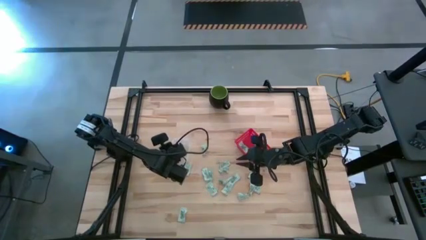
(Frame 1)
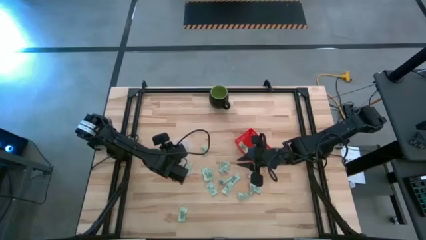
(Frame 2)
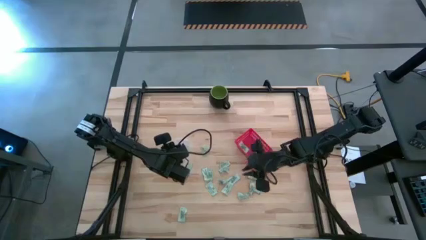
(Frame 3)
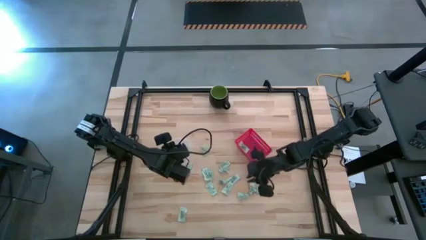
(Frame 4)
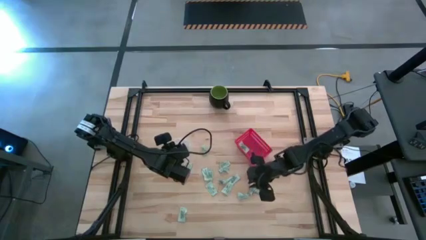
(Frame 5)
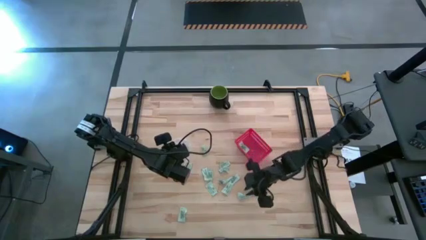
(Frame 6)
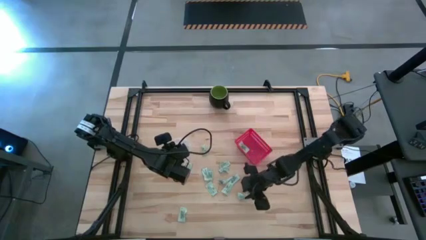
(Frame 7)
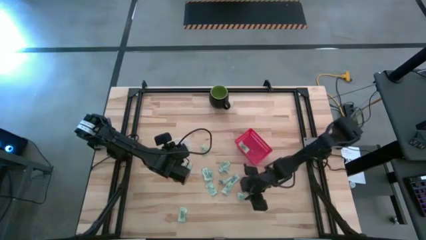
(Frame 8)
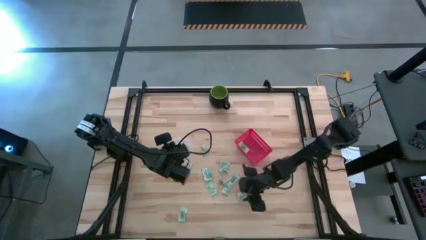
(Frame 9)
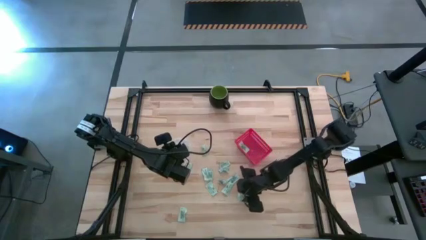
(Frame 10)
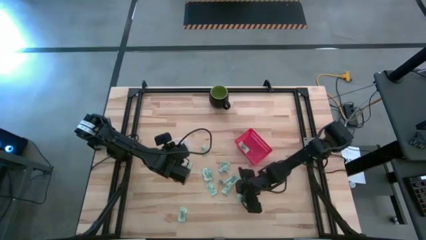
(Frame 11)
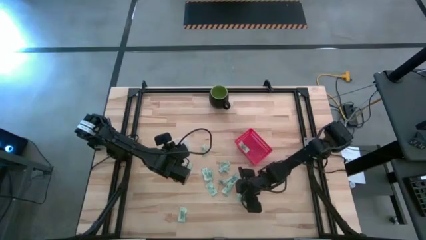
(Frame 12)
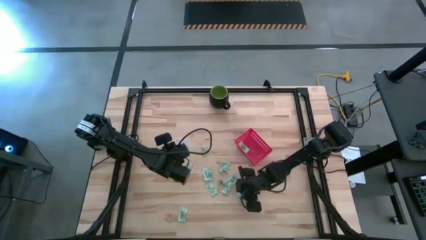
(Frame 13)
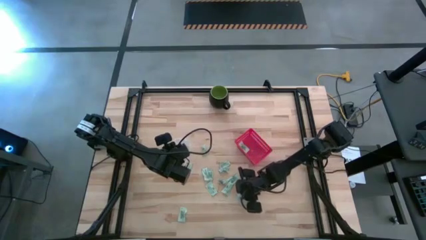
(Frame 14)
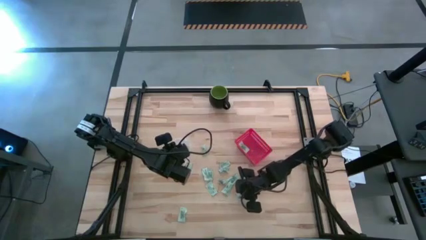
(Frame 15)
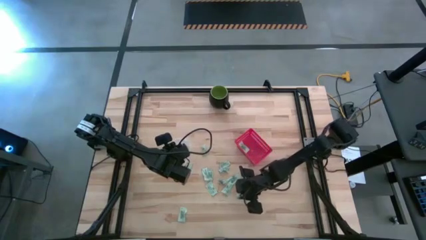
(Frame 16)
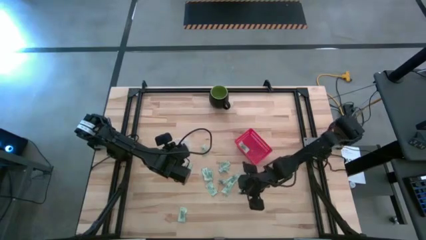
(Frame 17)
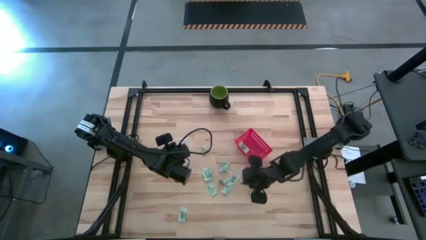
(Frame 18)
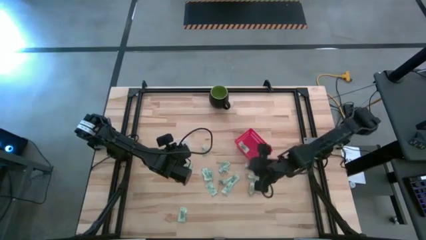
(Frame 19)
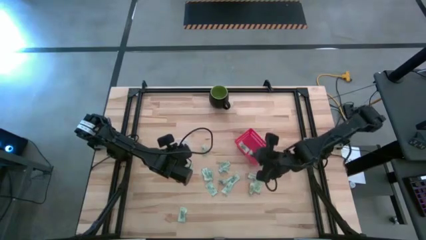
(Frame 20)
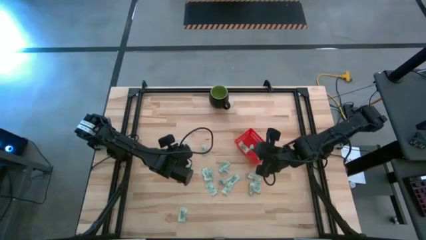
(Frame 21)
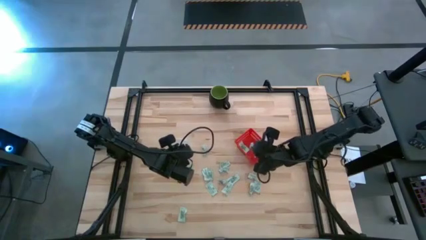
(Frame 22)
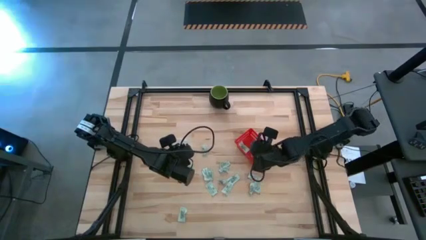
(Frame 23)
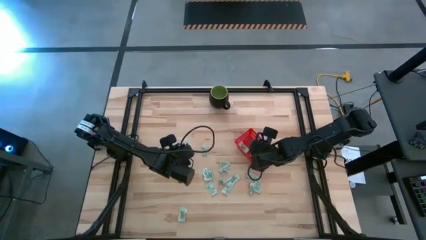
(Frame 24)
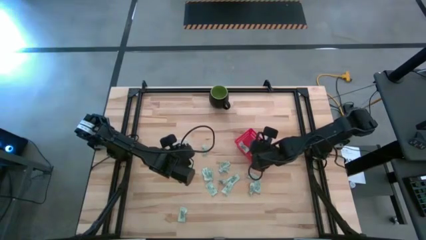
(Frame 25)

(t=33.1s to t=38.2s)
Task: Pick and place items into bin
Put the stevia packet into the red basket

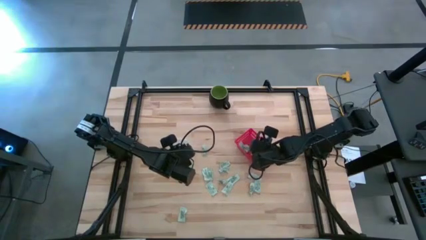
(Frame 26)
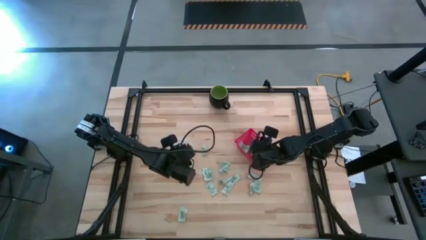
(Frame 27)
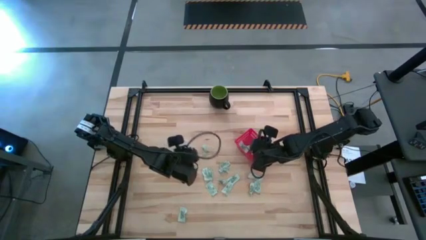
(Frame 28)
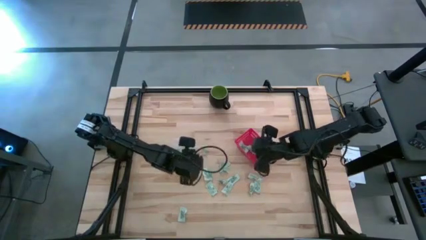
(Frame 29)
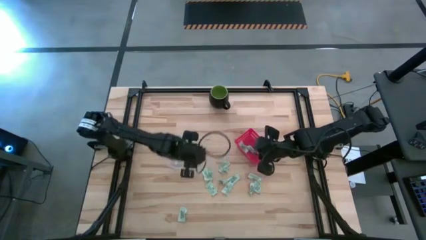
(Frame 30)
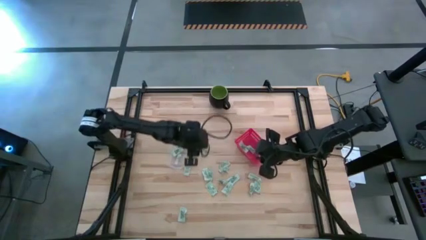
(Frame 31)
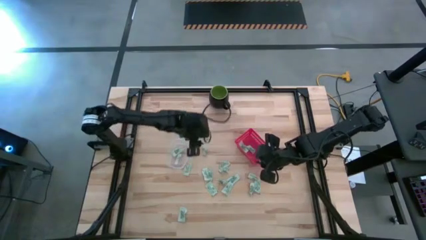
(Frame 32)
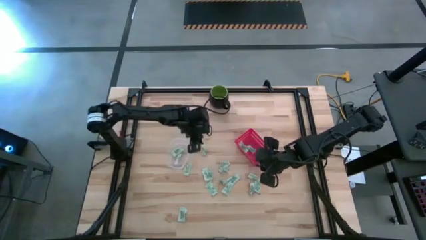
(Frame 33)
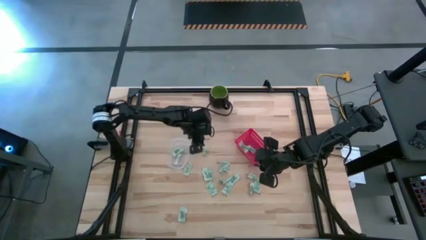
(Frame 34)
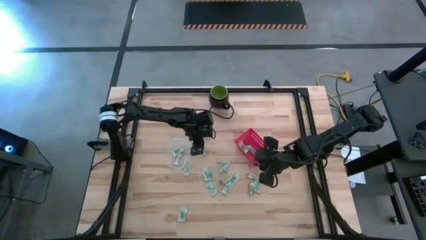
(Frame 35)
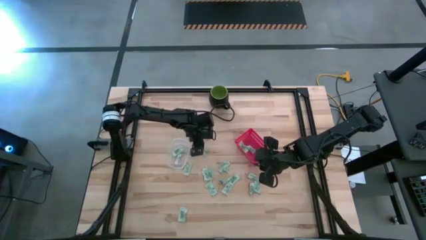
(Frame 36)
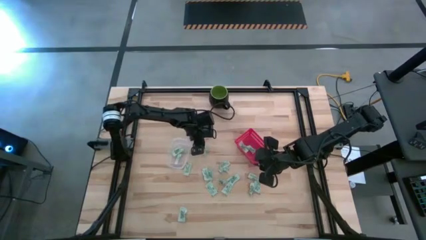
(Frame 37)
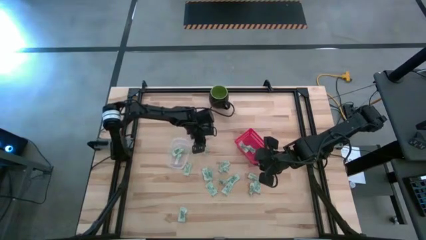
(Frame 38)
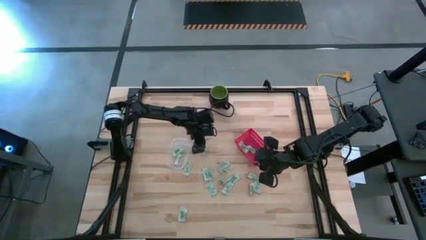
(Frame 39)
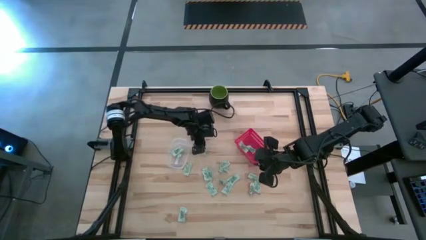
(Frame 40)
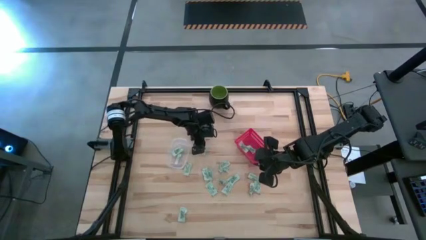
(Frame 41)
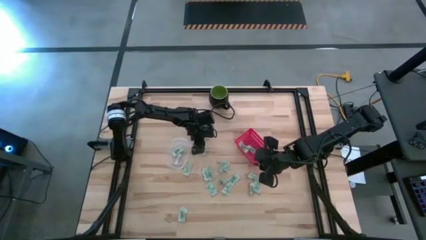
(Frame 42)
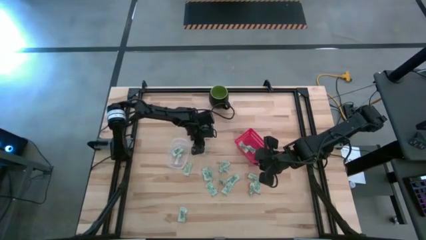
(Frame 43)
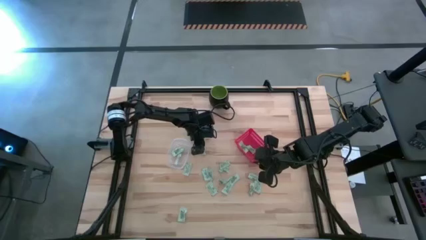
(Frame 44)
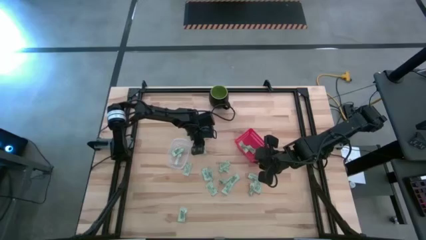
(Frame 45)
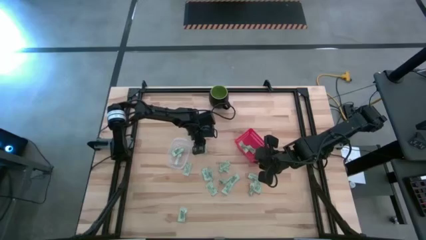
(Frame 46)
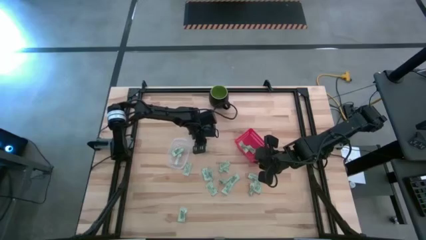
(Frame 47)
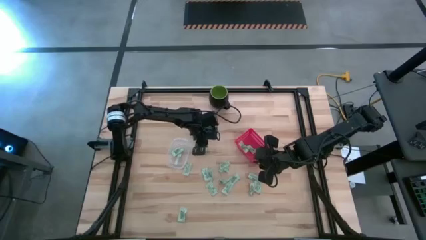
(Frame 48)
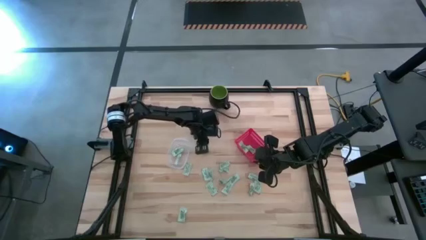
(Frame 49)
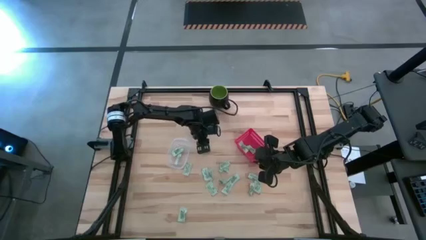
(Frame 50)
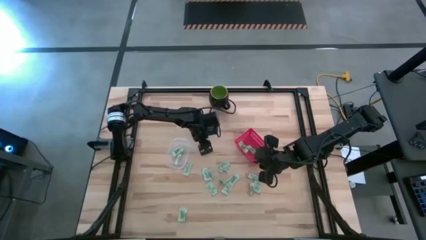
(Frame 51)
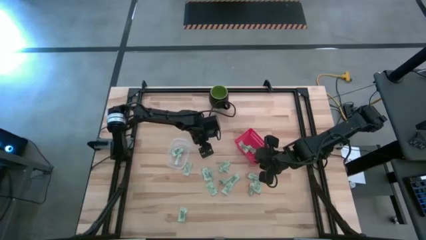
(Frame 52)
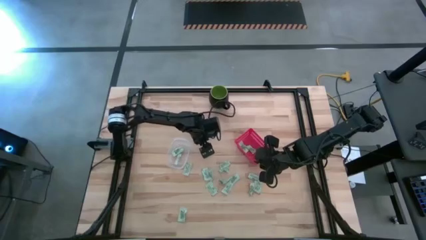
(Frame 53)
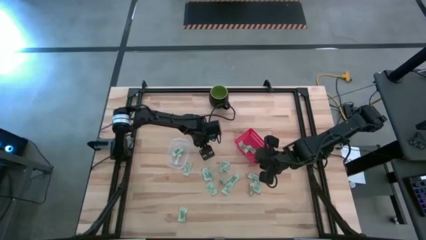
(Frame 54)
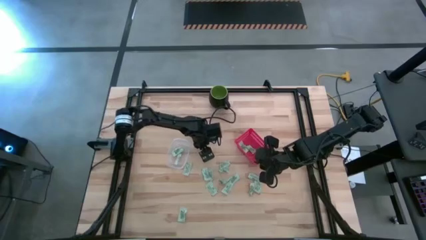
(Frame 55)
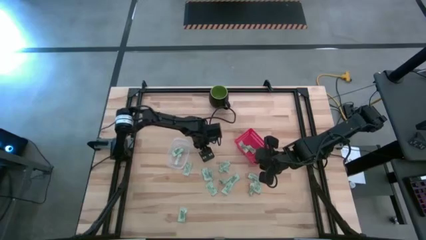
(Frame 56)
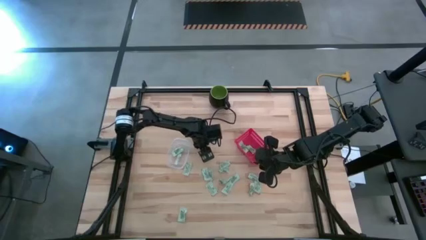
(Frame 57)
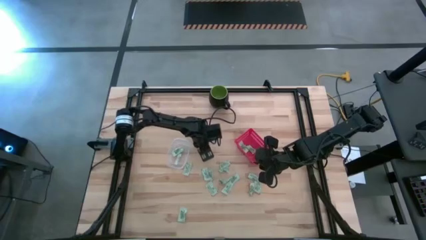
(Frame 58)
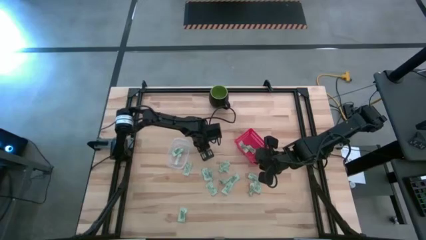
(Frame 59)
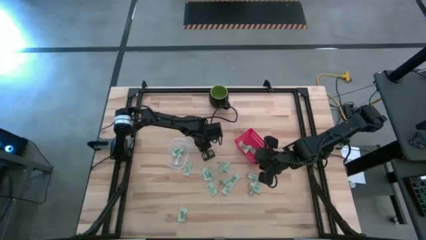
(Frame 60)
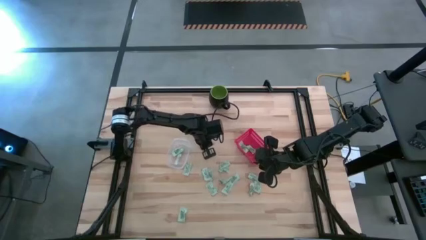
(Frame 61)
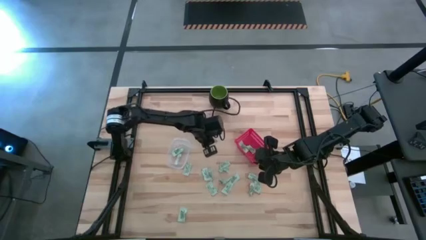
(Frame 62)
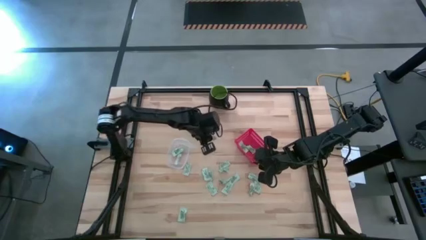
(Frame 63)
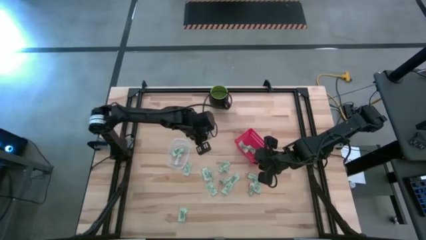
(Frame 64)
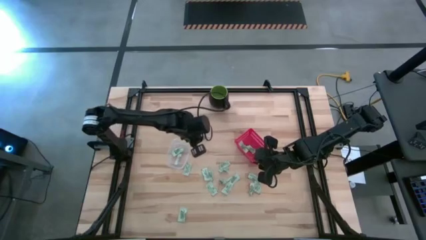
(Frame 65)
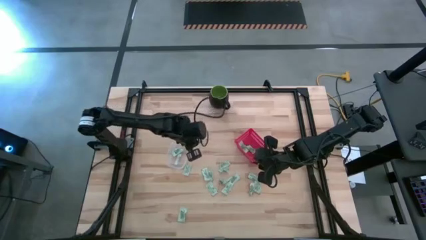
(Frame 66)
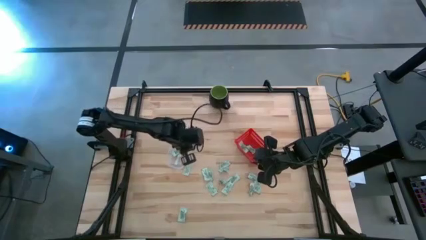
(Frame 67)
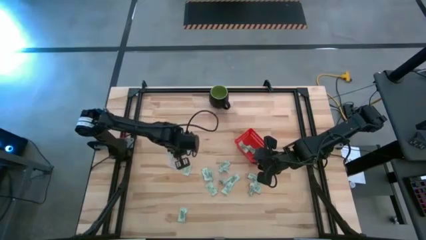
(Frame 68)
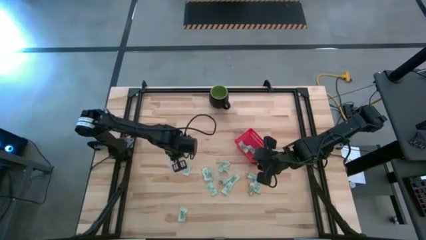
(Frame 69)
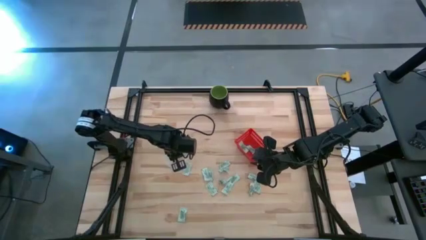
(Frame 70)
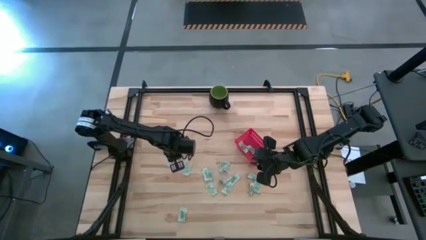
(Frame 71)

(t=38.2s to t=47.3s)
Put the stevia packet into the transparent bin

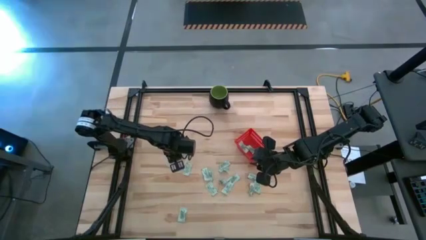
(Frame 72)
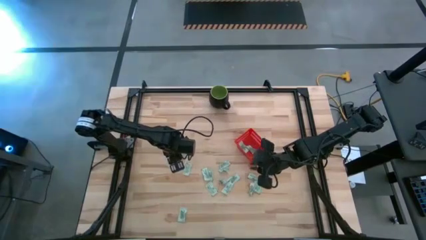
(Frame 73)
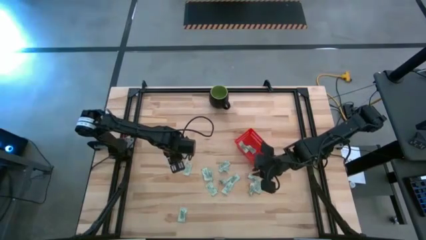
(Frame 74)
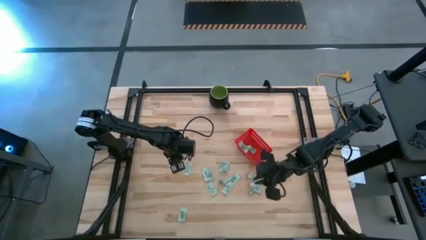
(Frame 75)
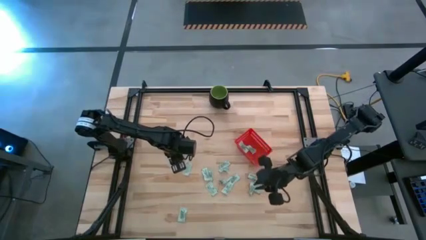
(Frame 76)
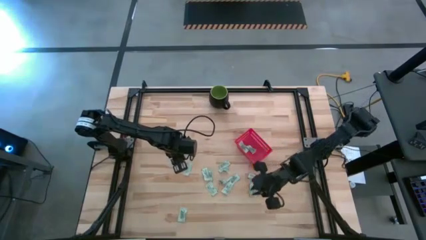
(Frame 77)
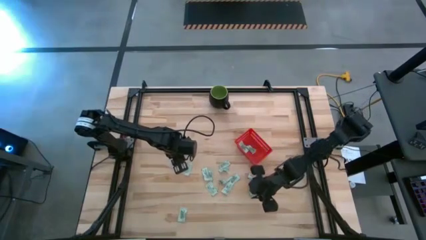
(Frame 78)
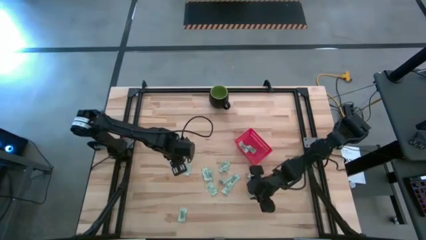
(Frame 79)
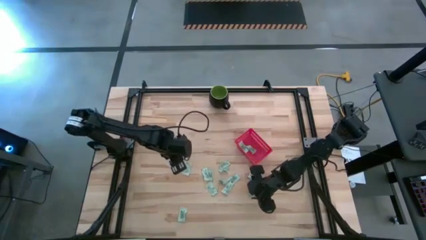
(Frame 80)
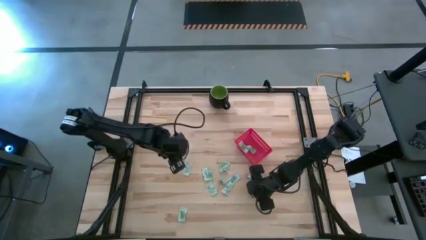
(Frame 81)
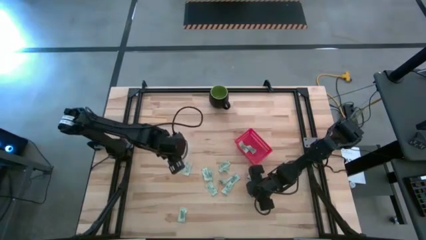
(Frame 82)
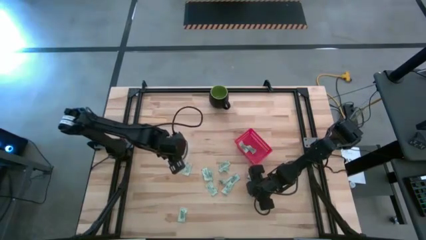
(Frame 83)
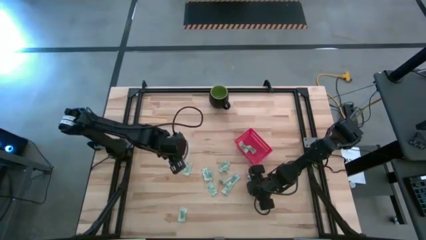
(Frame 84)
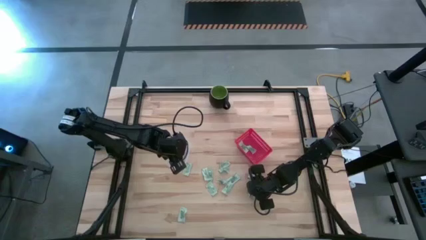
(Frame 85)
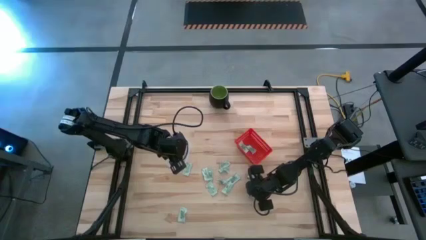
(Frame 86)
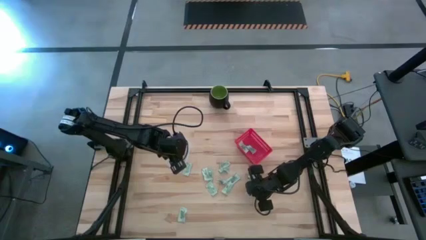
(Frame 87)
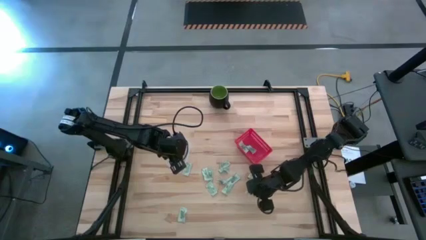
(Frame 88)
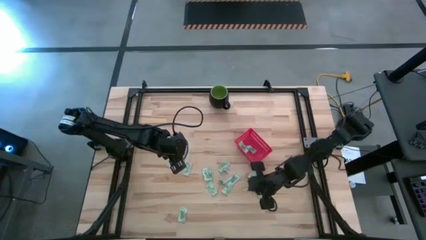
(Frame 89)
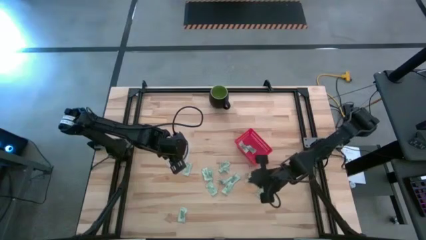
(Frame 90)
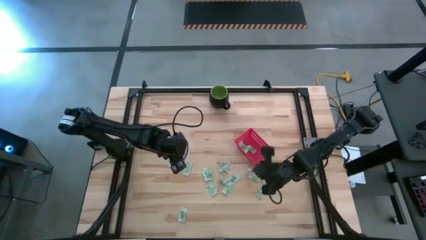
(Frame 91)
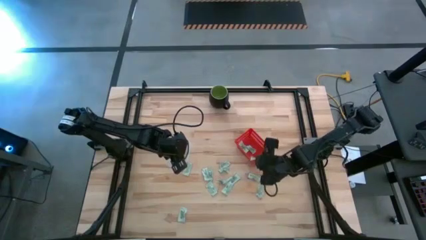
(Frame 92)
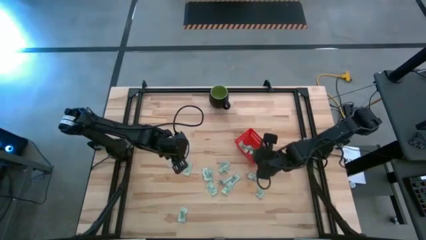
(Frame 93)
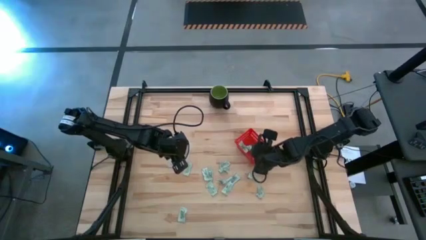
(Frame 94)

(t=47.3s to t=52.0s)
Put the stevia packet into the red basket
